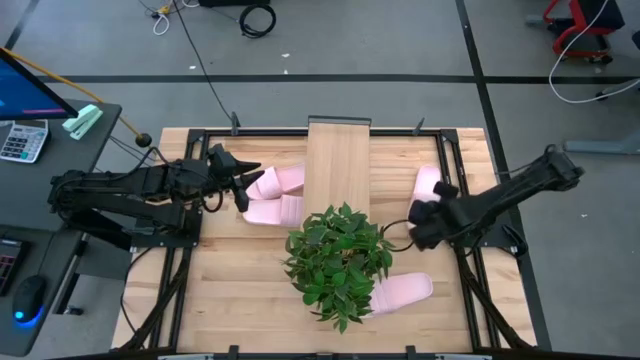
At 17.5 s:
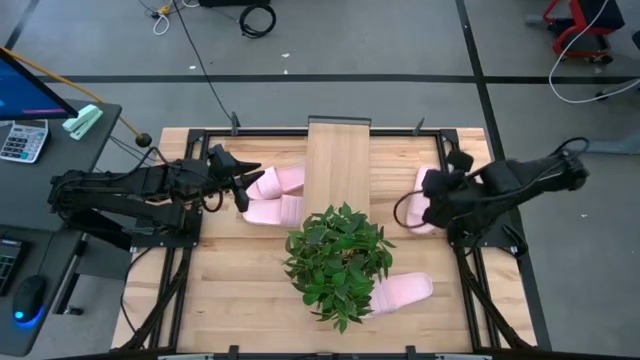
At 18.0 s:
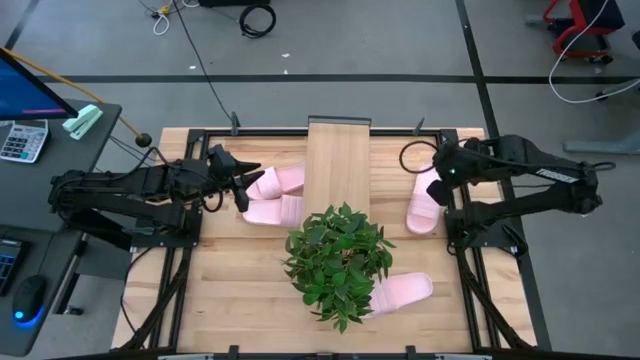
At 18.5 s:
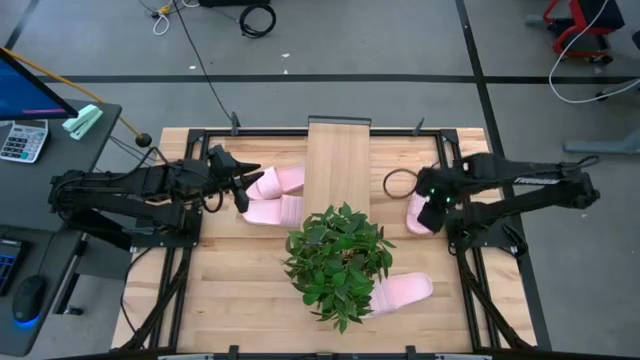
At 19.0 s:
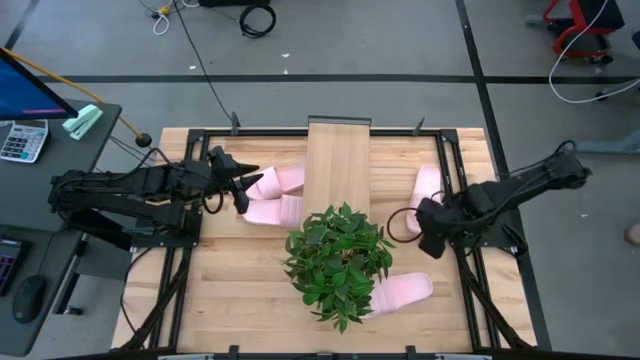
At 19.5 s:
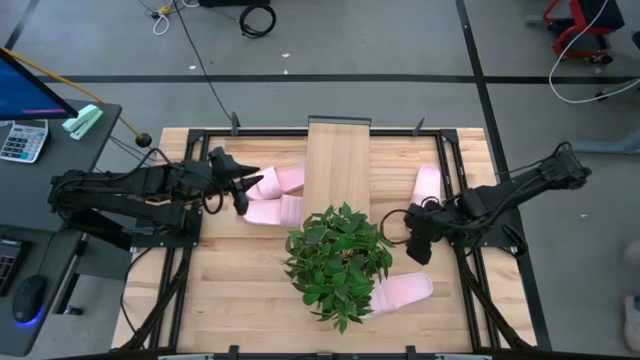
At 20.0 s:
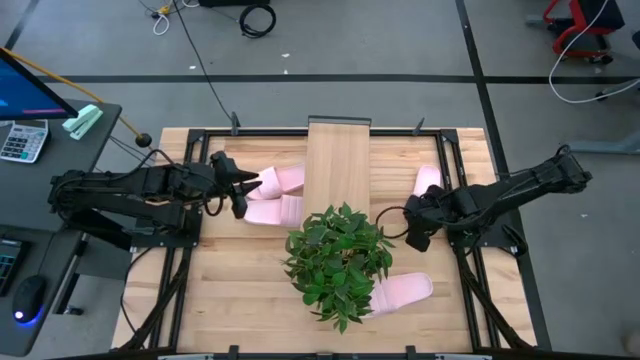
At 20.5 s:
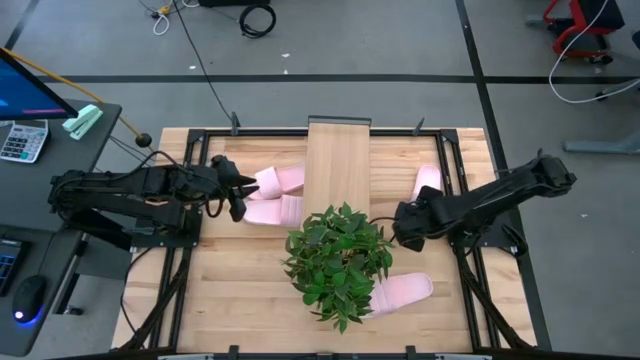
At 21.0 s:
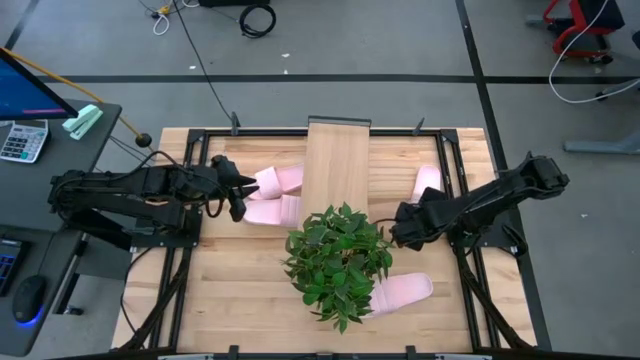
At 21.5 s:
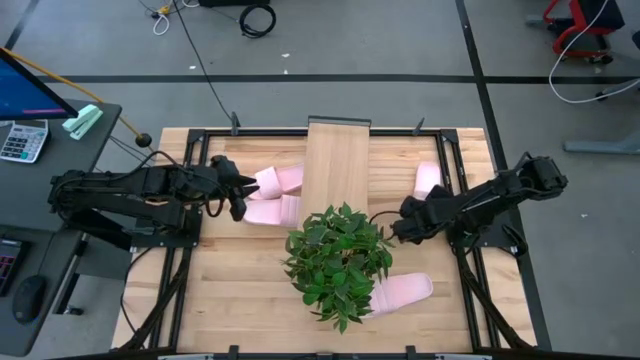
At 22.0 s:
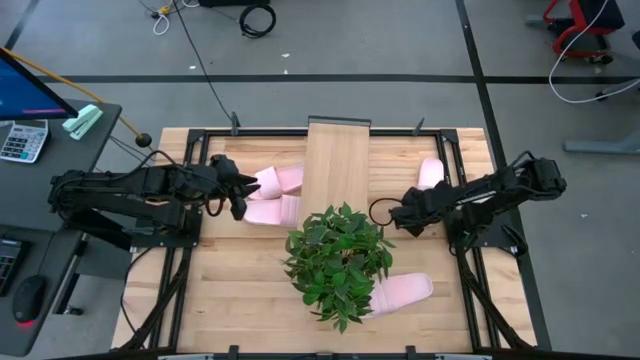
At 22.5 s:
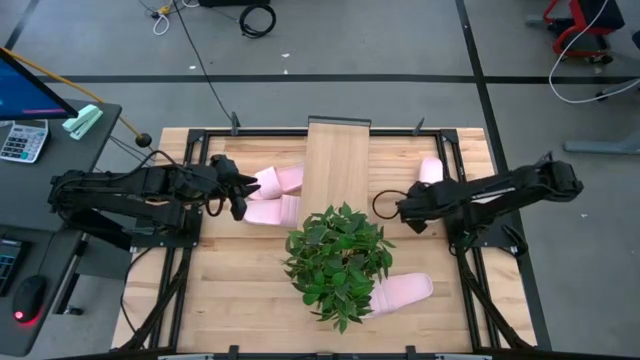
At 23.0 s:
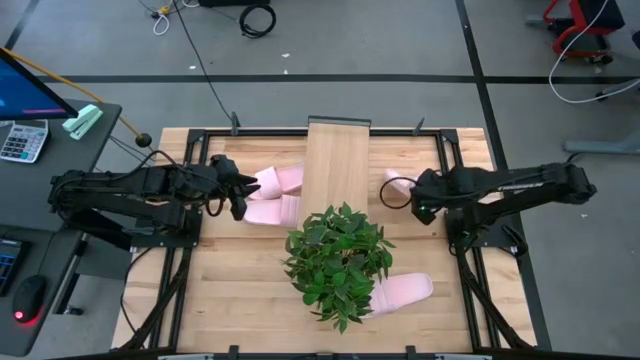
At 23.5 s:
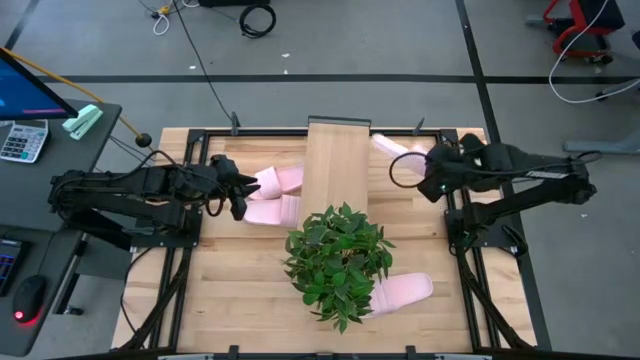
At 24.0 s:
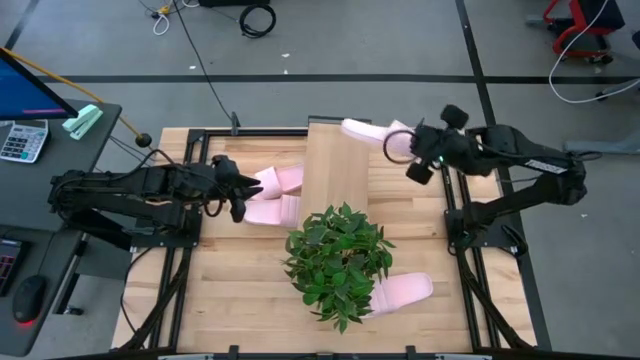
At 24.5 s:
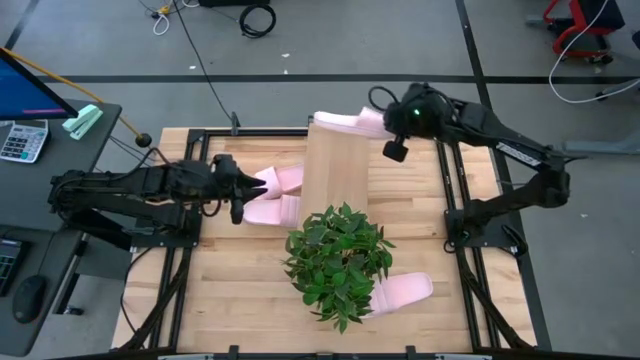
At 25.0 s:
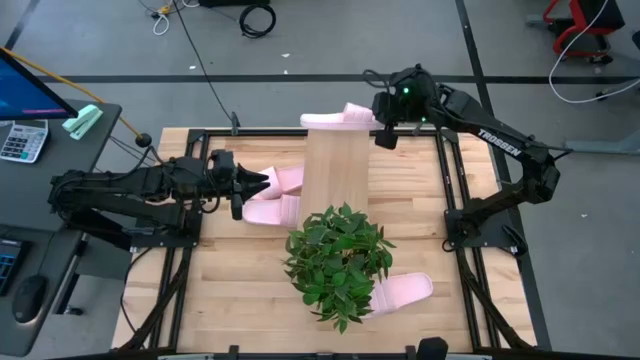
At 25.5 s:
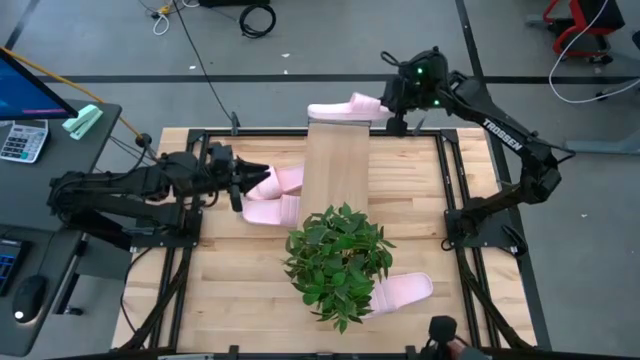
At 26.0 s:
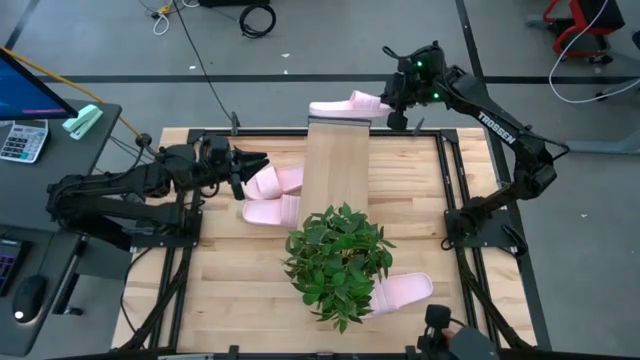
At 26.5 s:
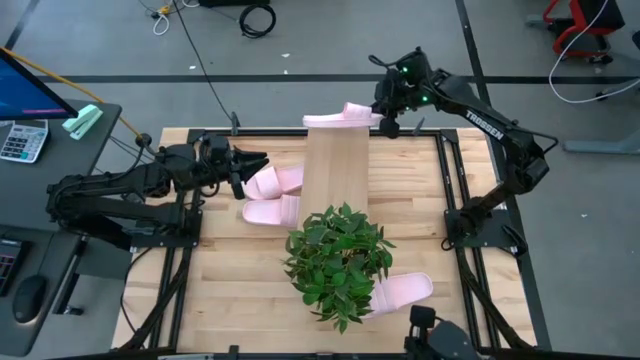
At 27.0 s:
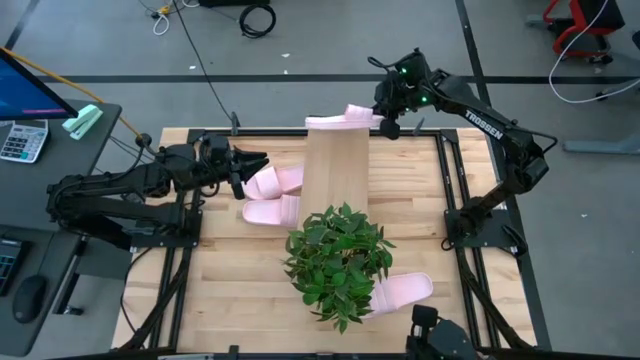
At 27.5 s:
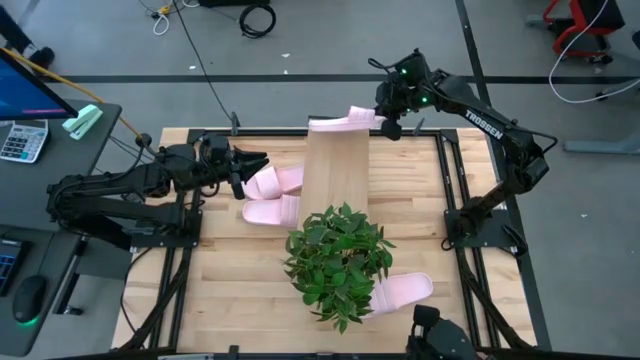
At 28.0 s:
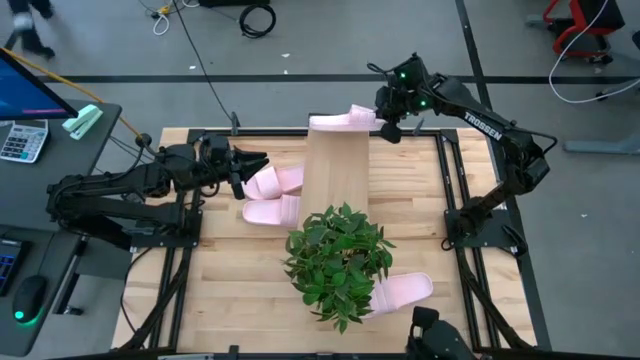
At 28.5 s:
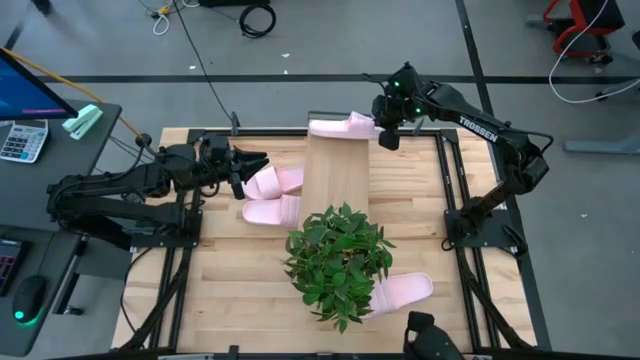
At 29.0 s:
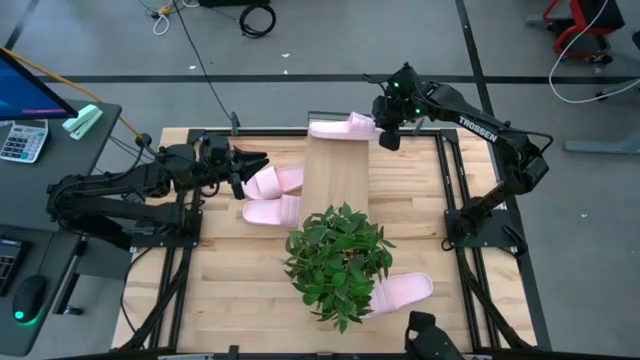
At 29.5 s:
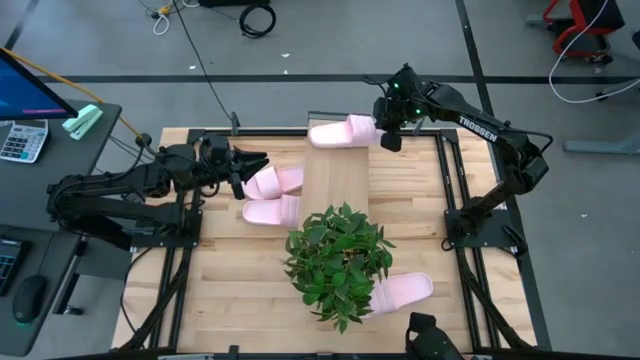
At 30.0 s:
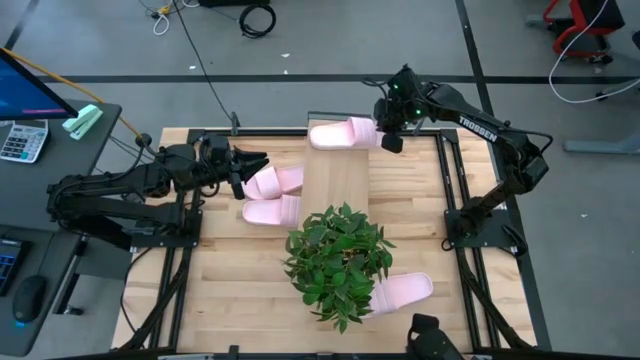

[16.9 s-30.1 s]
Task: Pick and place slides into the shelf
Put the pink slide on the shelf
